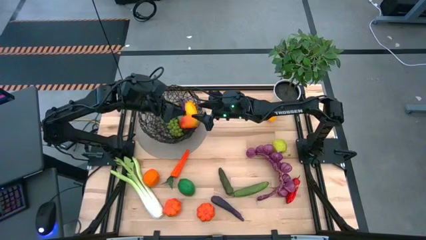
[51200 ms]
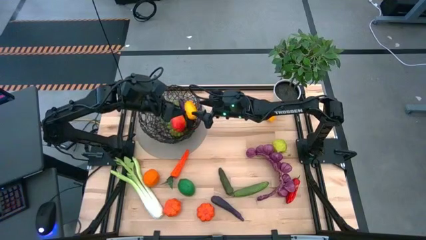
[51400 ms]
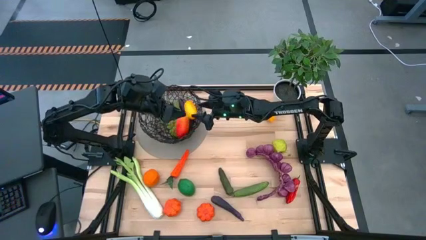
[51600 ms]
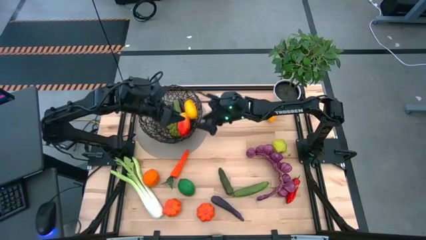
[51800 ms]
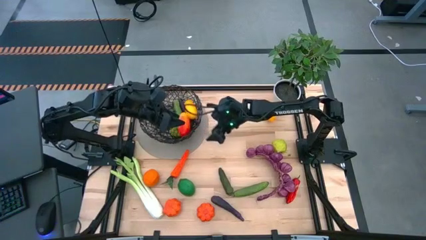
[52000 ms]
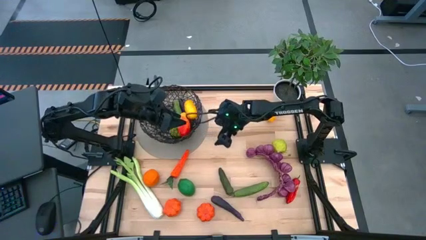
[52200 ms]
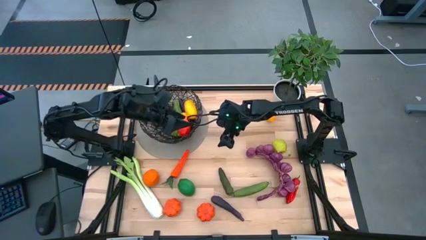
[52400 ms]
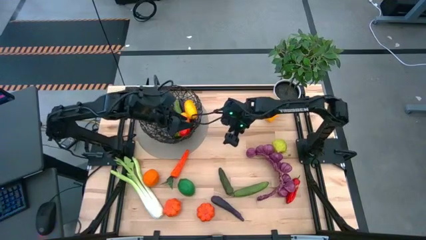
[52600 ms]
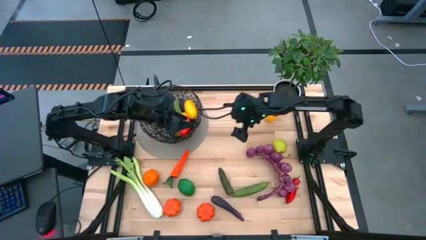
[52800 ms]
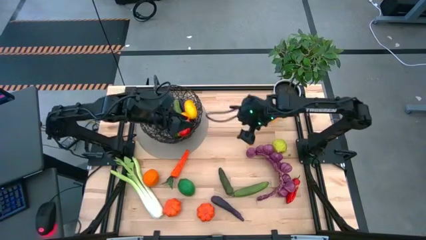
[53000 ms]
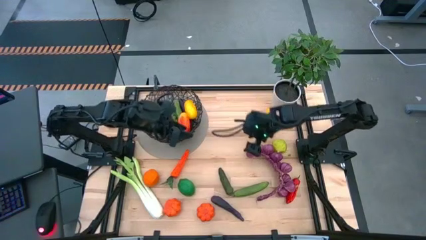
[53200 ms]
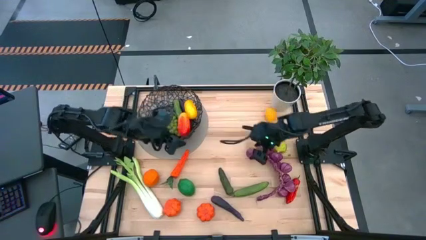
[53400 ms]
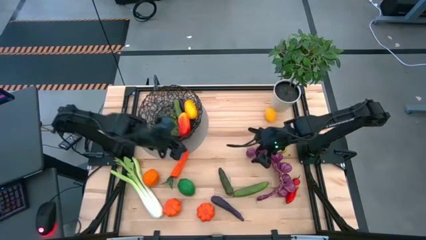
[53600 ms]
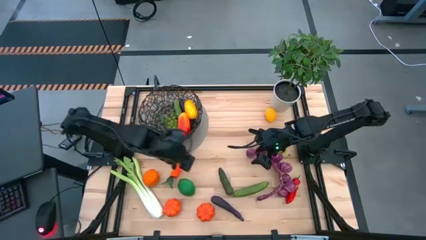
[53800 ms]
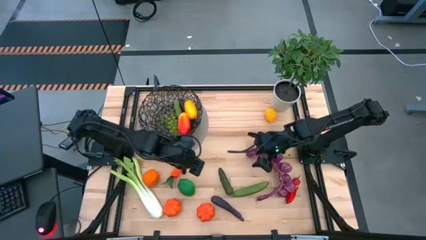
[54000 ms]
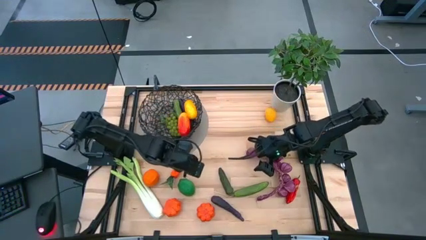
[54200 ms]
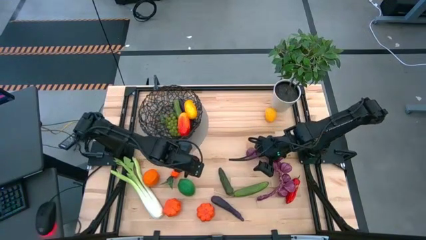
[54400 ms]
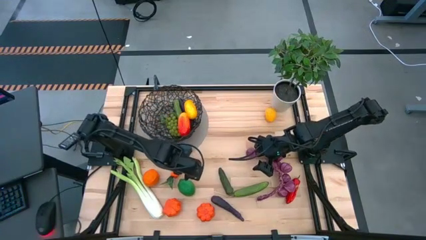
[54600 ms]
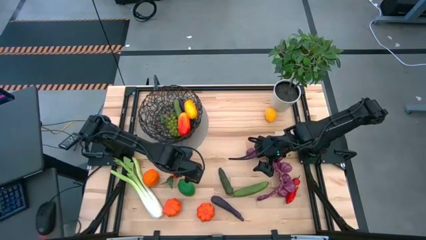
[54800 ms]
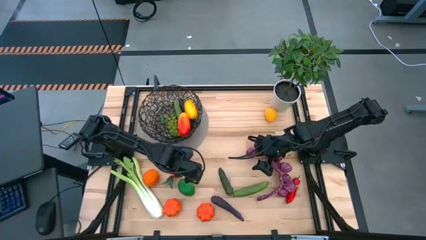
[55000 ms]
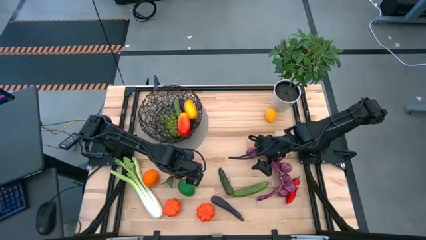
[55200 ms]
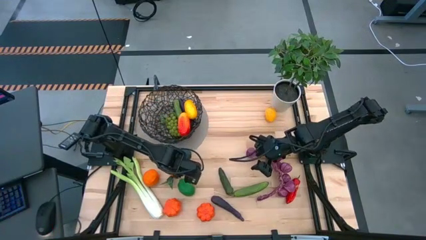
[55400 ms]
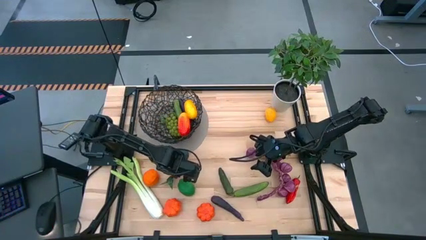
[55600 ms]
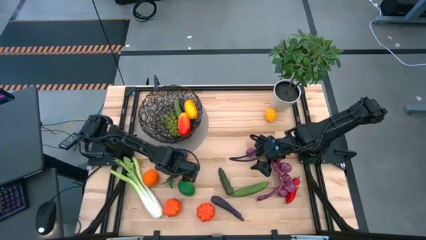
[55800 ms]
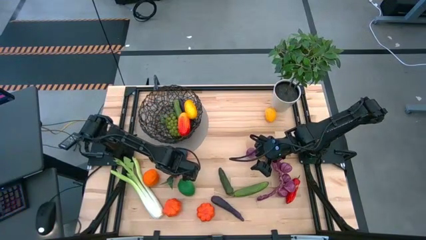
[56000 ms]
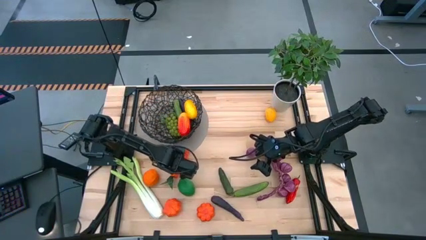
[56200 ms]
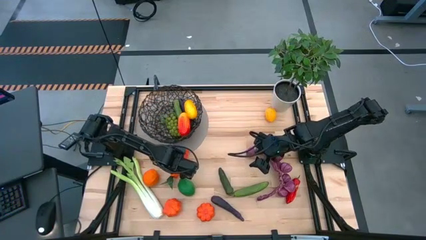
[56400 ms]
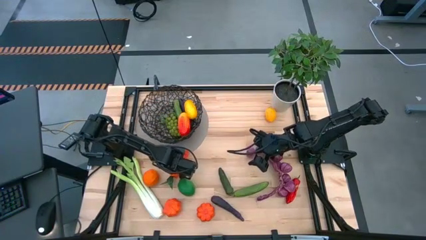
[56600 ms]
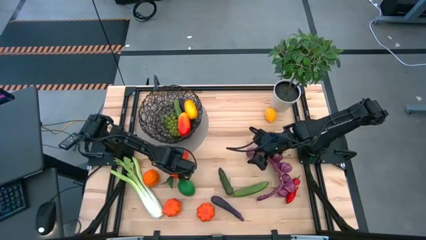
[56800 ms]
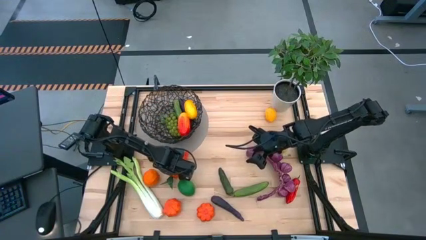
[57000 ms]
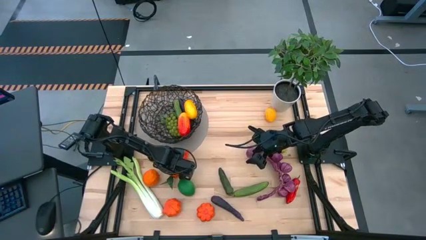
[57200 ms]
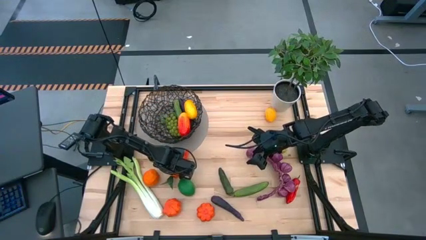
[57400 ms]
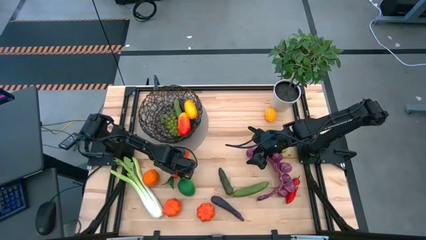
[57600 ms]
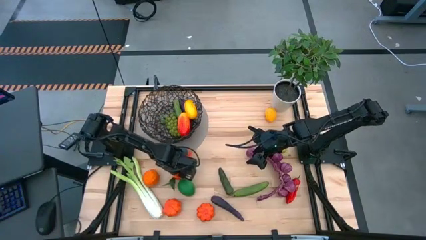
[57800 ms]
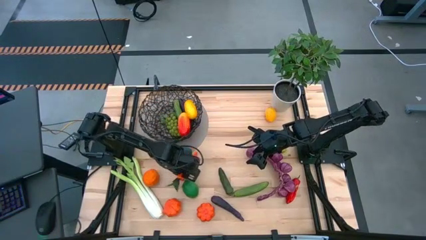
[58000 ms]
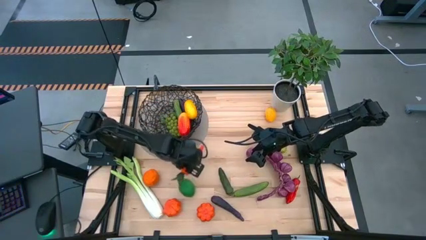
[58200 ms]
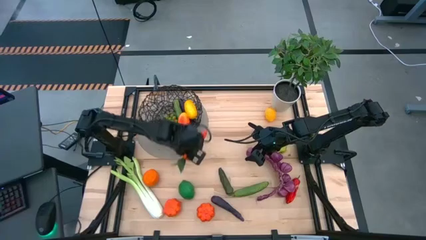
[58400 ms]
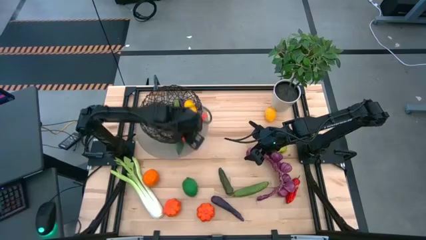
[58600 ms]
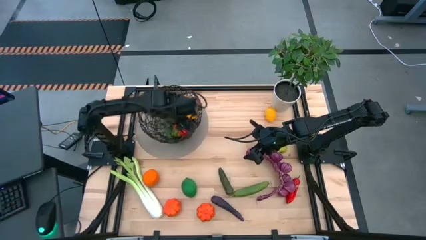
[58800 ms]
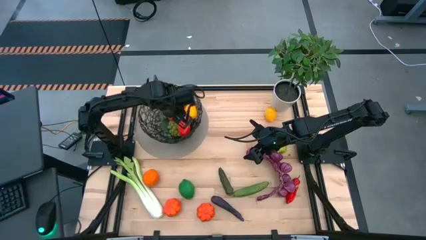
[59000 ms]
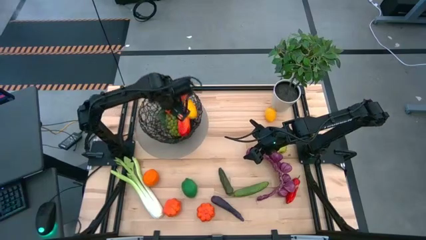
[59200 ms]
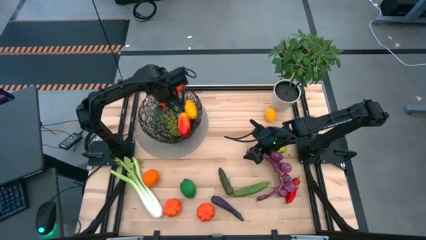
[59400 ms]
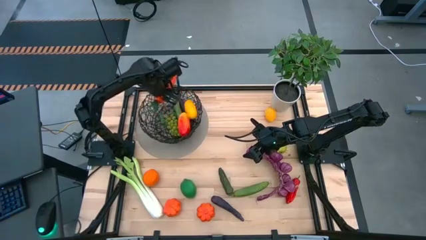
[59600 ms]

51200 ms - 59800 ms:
Task: Build produce basket
Put the orange carrot into the black wire basket

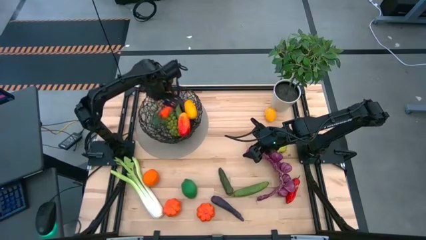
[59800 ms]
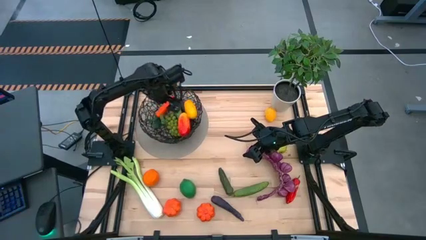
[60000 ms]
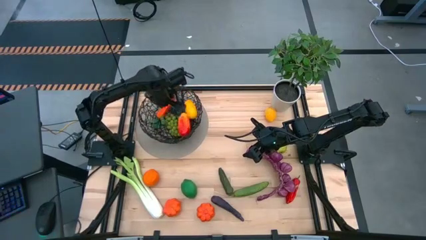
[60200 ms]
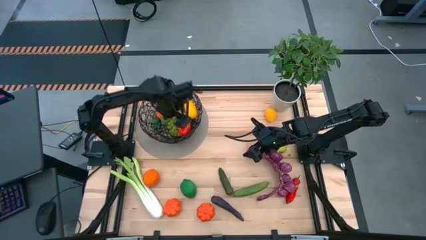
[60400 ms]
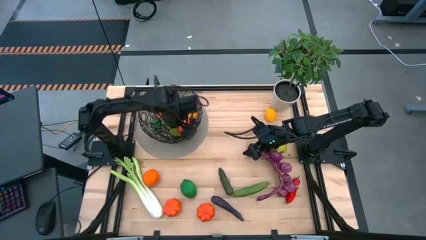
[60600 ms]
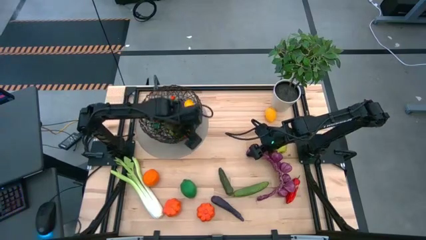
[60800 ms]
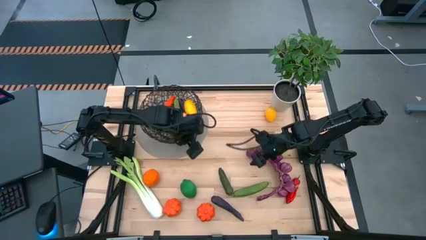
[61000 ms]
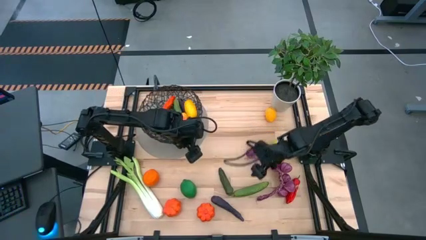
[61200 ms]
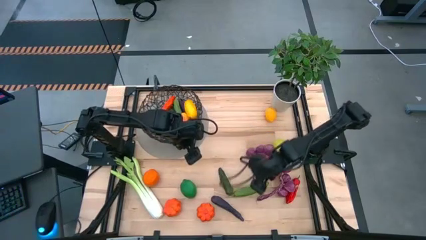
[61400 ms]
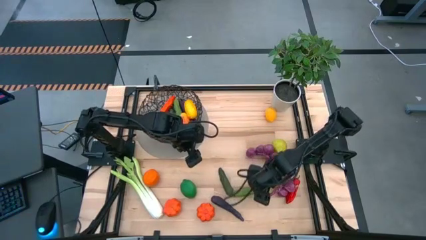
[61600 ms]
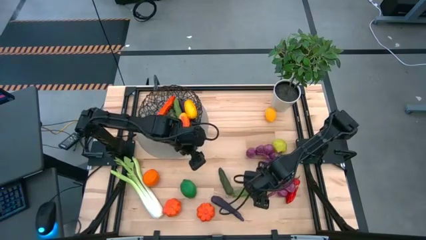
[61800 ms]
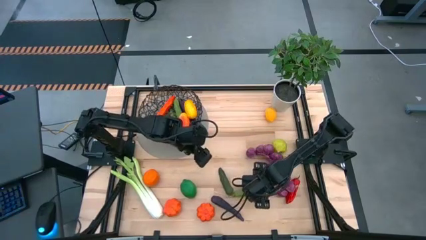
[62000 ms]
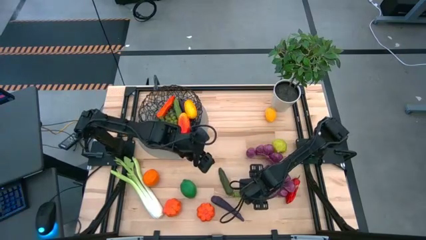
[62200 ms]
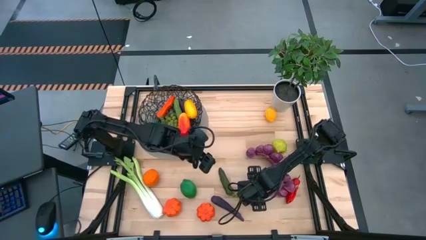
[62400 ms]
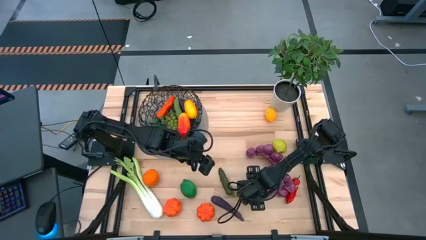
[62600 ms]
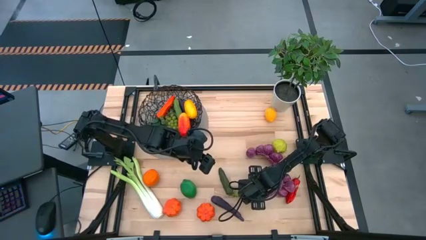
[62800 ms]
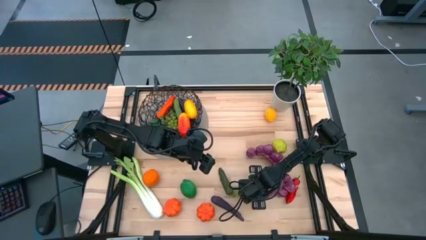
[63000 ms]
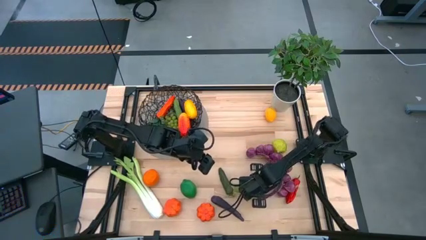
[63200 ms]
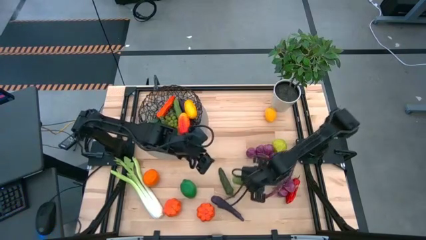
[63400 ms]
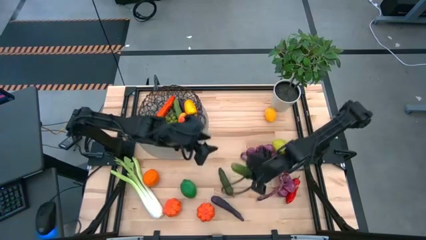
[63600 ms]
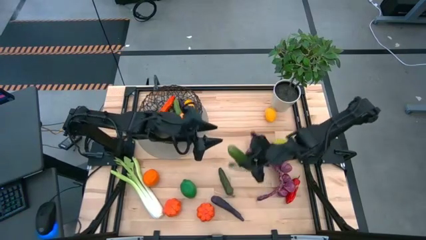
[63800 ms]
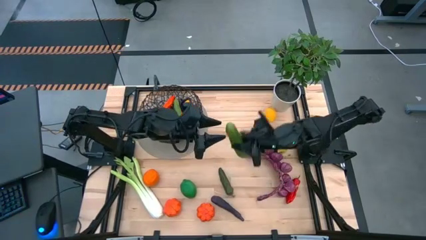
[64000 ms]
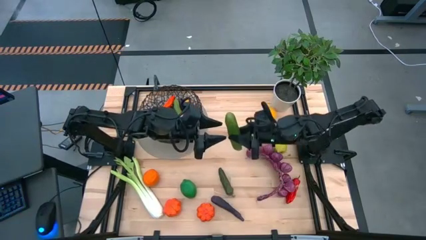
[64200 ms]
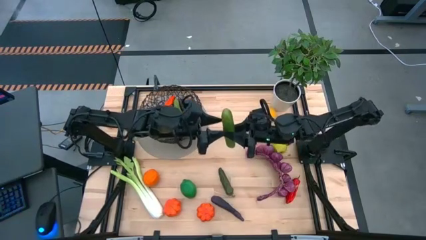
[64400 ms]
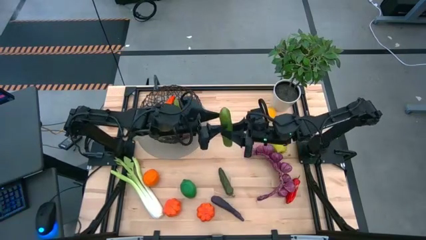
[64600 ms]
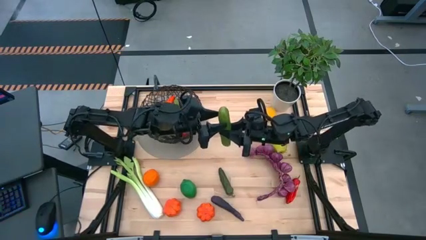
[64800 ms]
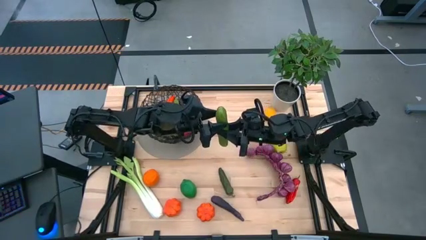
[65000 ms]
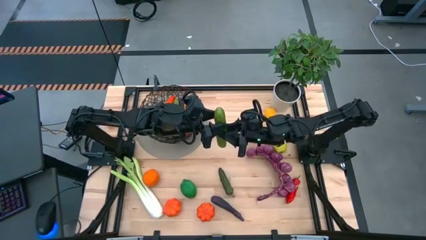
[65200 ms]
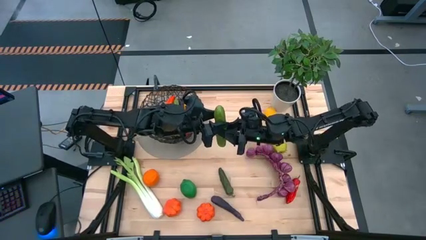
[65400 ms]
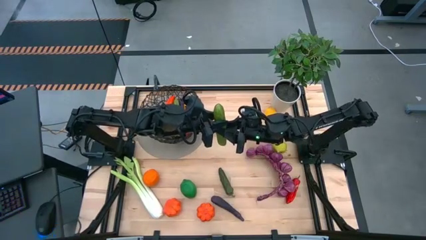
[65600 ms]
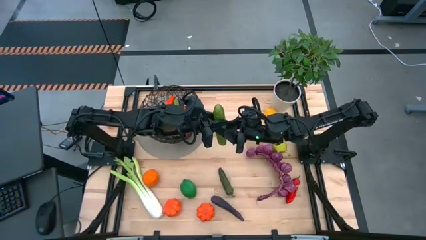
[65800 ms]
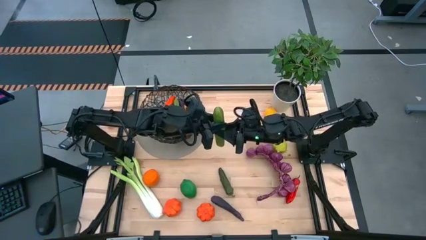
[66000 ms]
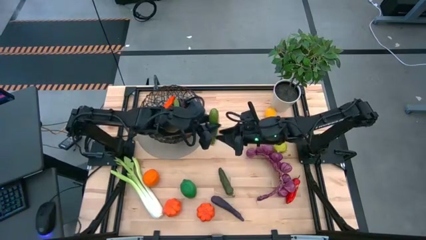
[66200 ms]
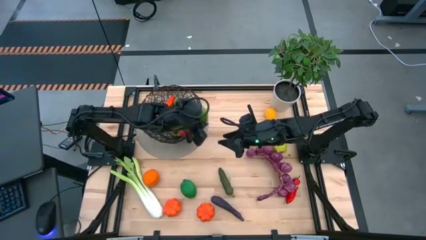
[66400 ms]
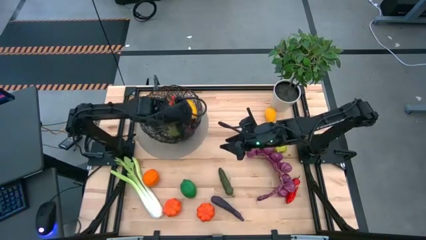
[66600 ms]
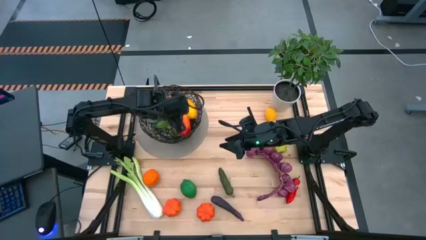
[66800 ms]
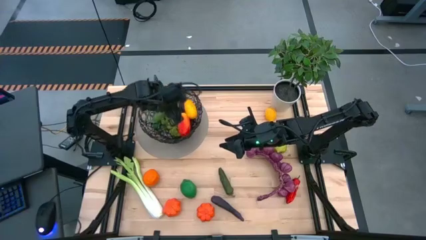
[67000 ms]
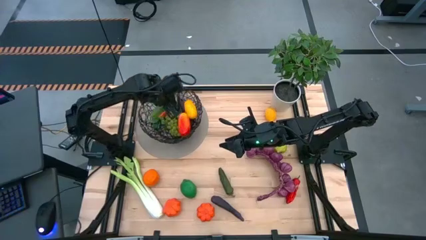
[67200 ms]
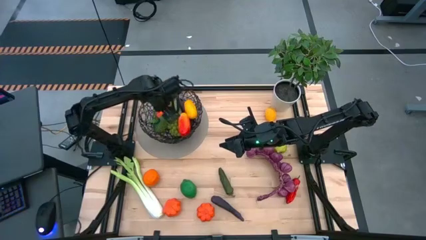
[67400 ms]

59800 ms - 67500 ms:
Put the green cucumber into the black wire basket
